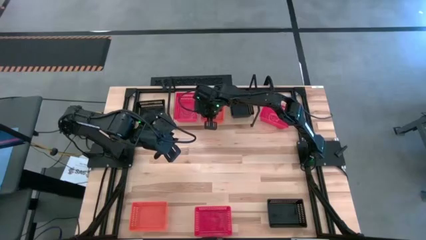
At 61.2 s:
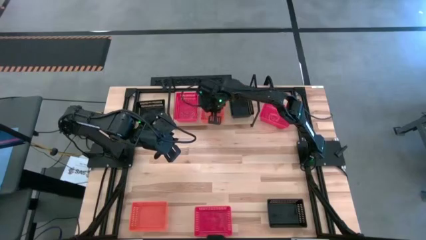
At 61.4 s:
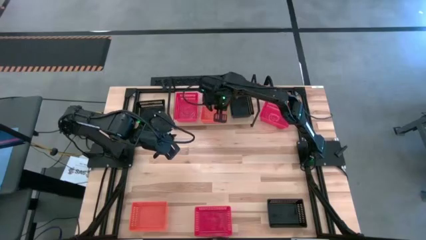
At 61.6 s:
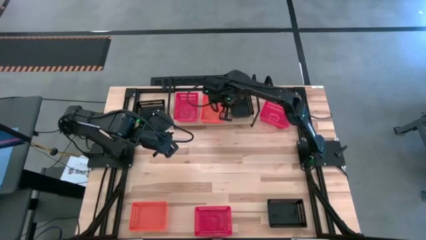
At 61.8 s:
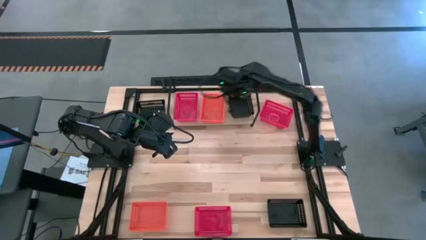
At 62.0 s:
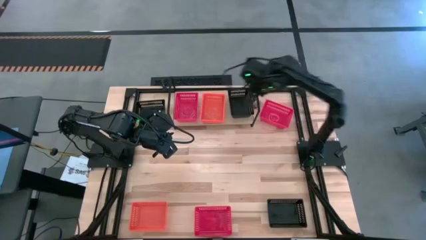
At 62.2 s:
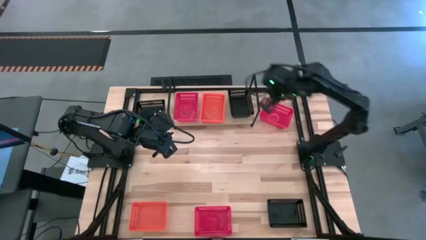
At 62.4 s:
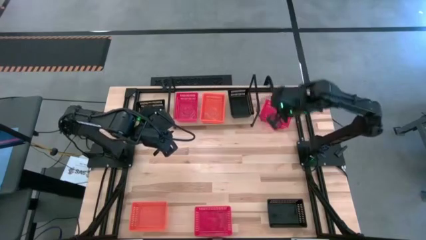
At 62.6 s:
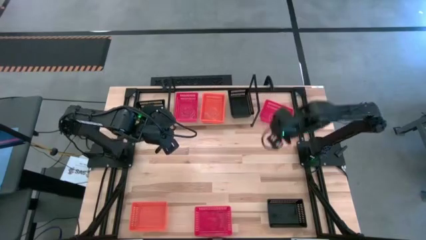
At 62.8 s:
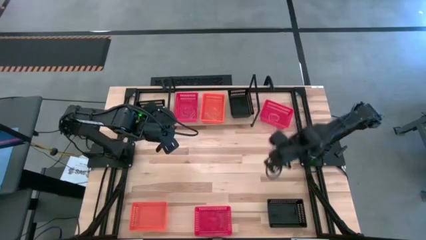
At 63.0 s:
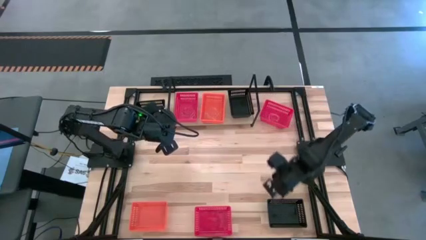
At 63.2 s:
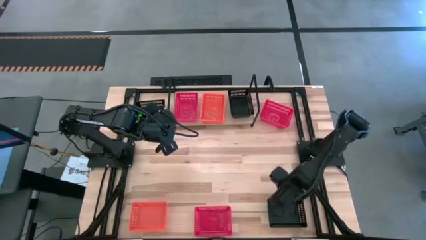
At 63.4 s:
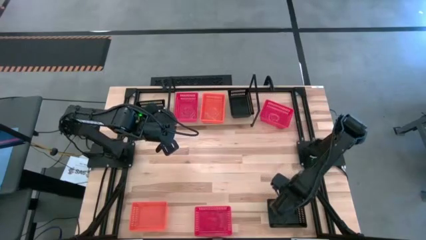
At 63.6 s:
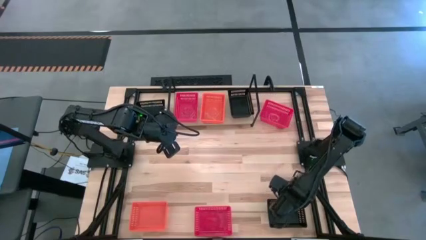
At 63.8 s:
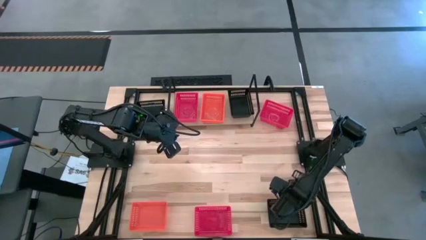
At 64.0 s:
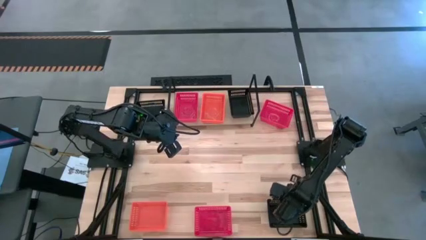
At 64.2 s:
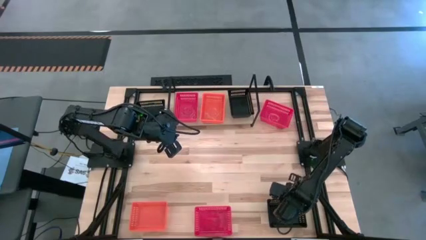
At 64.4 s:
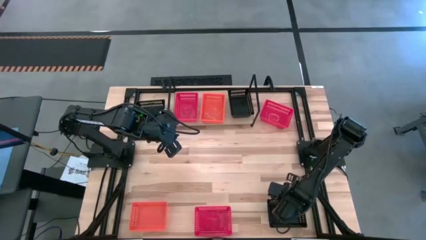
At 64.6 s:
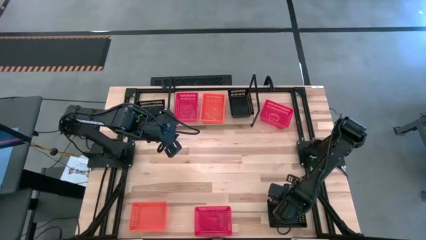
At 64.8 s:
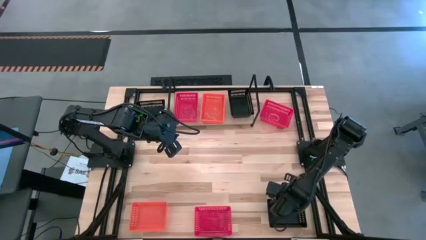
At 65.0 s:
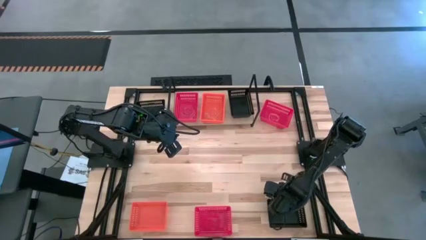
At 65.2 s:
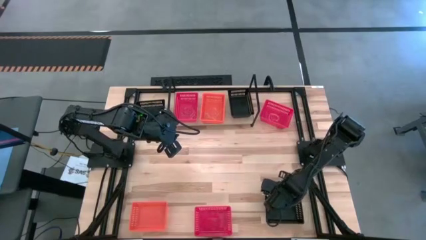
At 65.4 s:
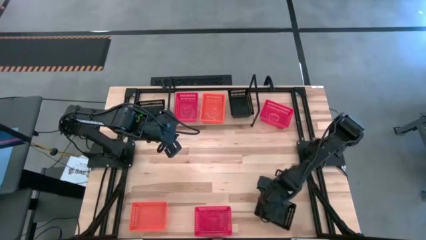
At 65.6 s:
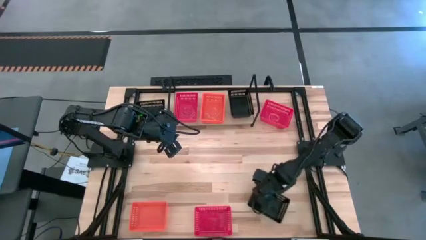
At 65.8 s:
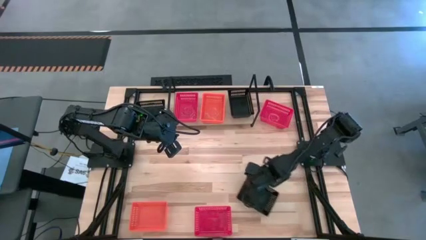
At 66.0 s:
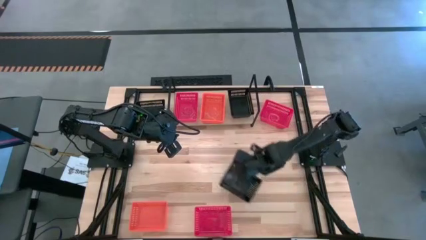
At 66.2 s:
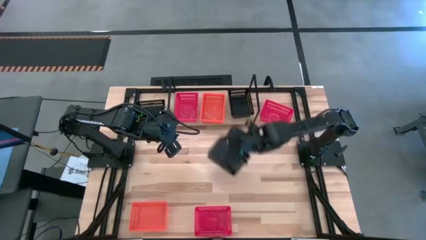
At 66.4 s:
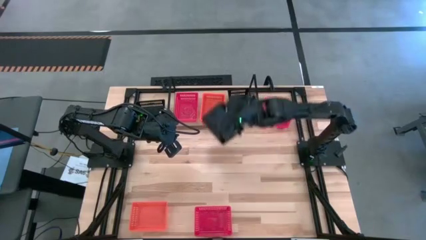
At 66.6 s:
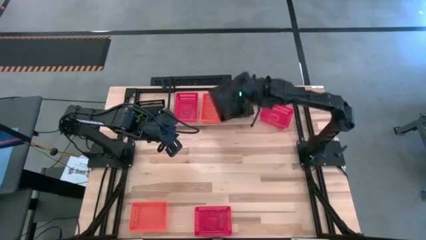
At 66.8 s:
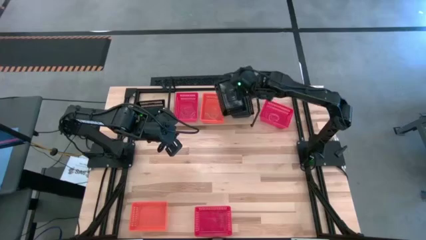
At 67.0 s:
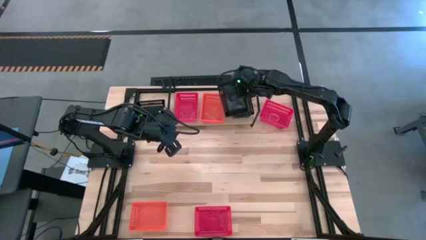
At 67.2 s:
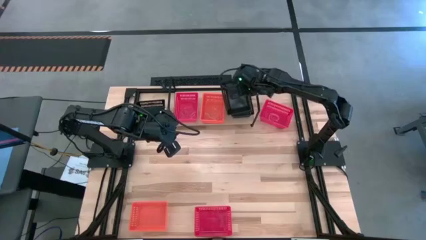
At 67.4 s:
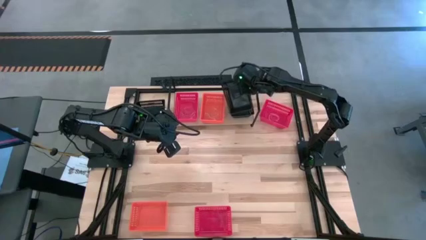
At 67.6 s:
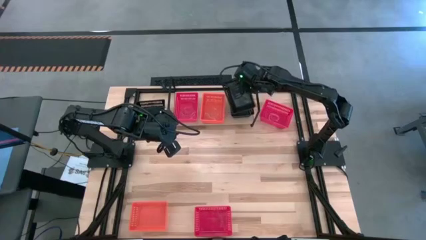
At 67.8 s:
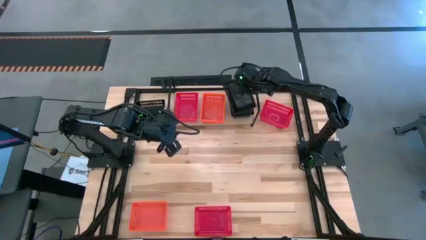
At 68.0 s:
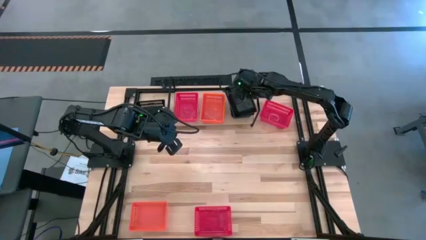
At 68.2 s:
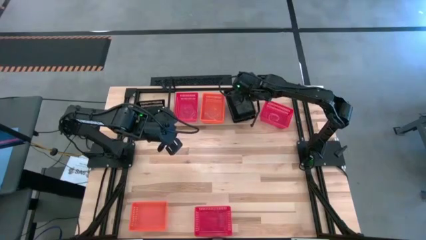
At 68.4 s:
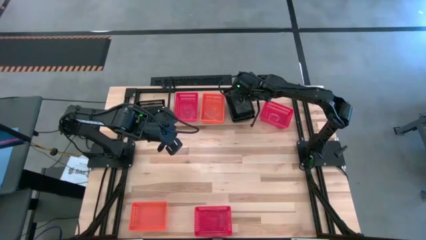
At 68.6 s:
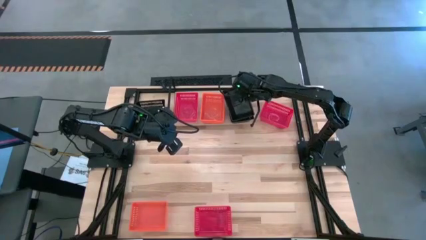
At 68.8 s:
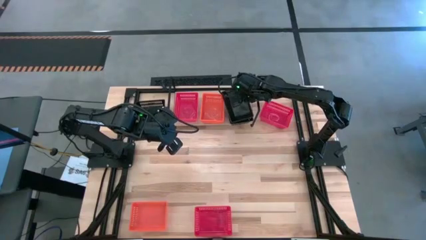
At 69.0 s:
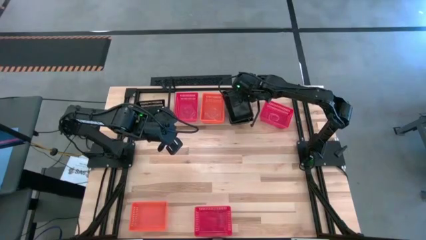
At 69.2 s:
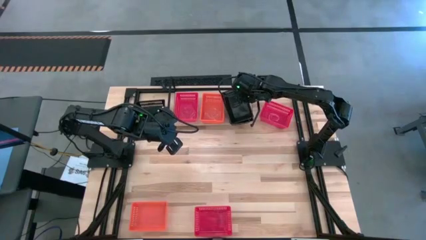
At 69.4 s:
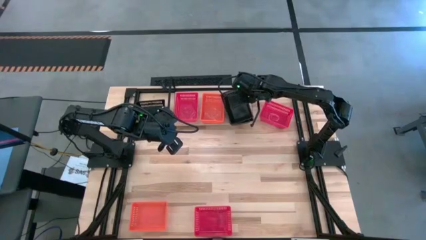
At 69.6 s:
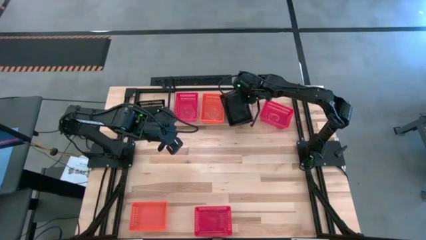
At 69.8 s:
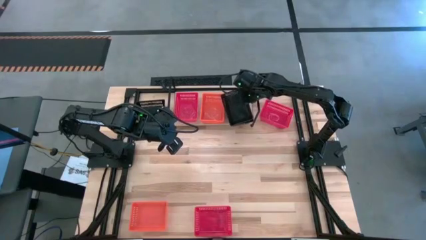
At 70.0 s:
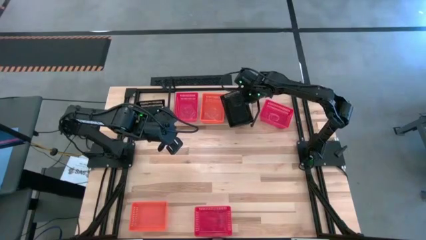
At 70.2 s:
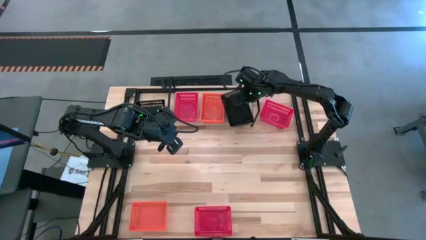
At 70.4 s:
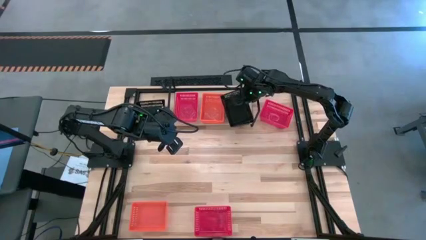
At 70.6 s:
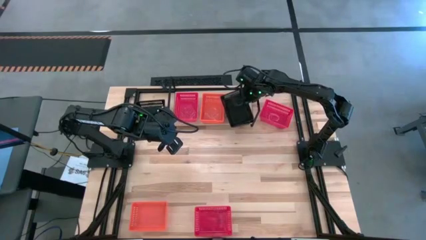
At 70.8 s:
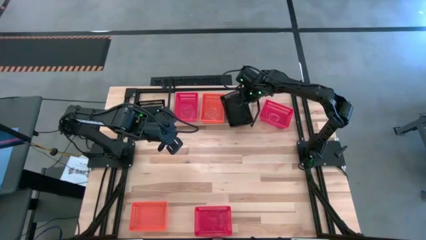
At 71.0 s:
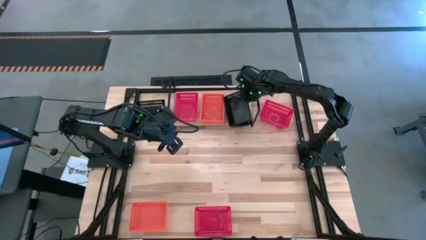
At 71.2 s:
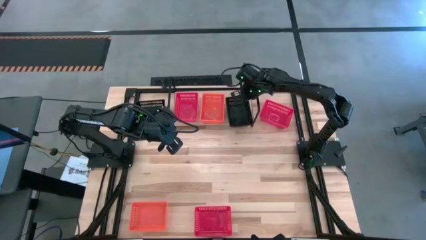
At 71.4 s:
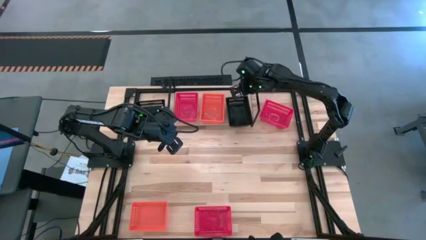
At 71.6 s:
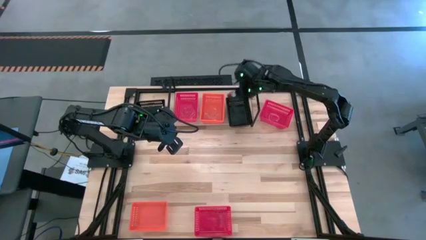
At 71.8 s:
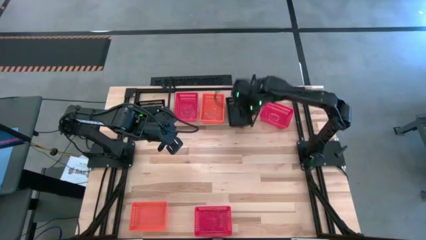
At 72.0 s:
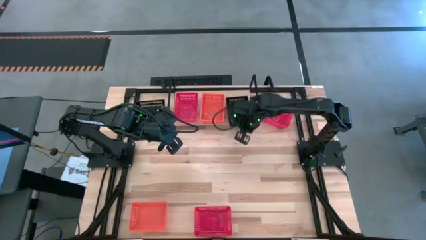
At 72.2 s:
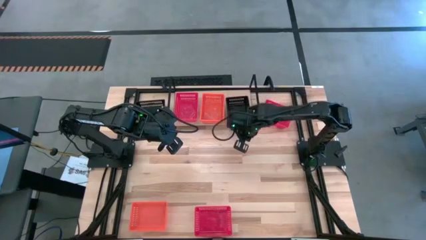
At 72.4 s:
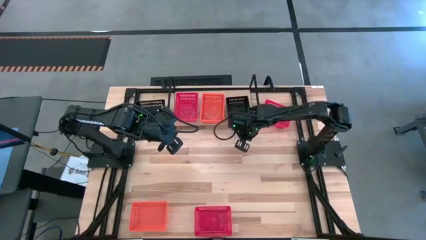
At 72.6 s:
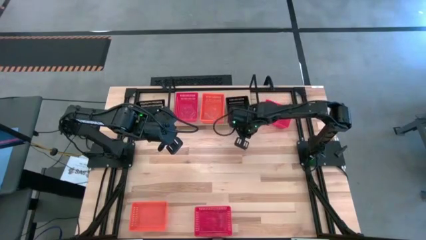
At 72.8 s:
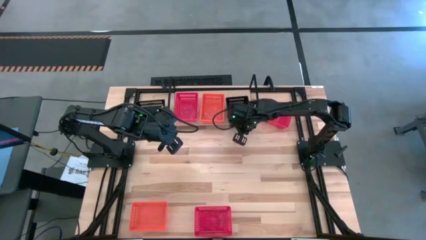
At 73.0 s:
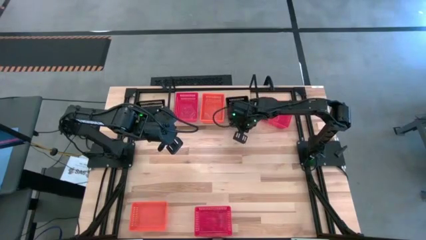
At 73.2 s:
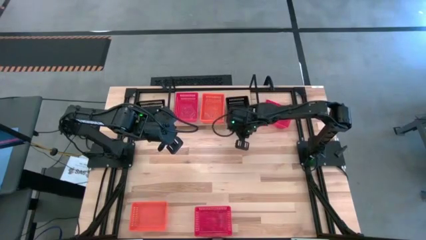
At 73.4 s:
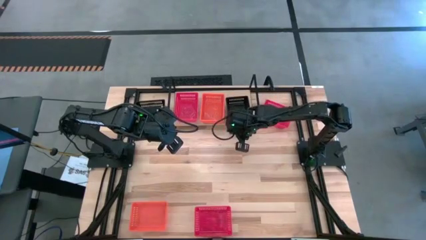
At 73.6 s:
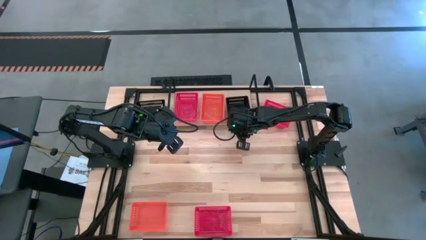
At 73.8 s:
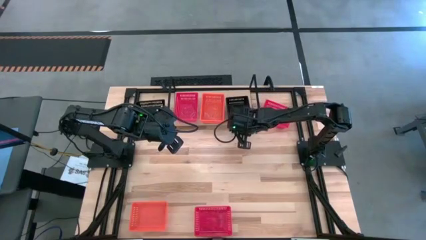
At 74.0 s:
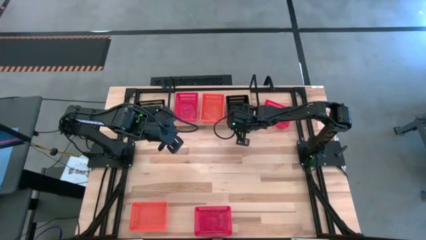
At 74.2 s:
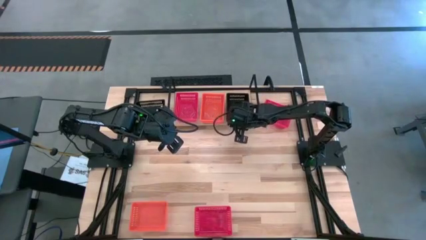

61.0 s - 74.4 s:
Task: Stack baskets on shelf by color
Stack the bottom black bin on top of the black bin on the shelf
